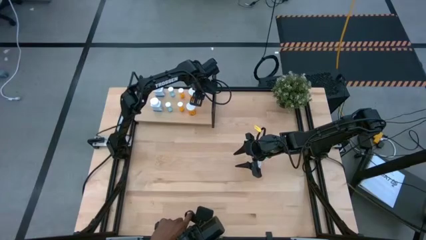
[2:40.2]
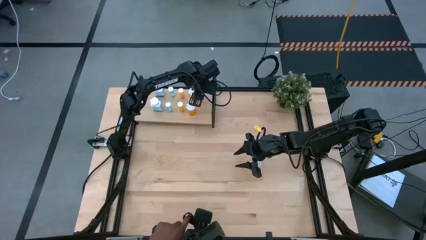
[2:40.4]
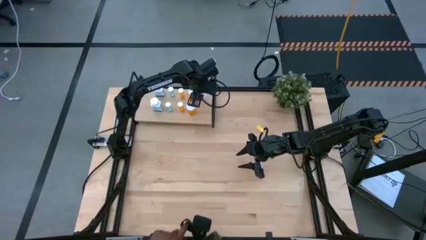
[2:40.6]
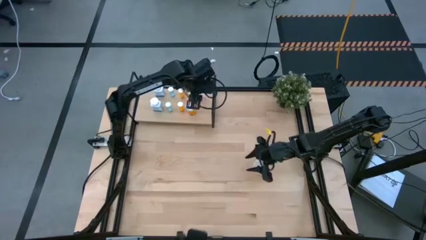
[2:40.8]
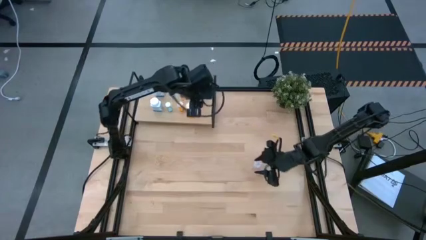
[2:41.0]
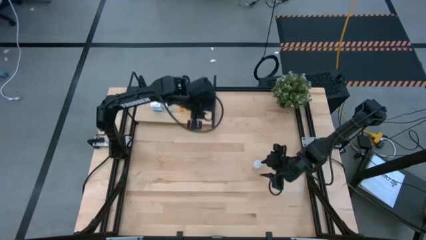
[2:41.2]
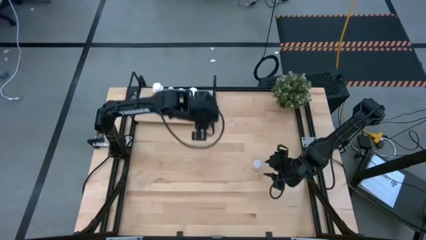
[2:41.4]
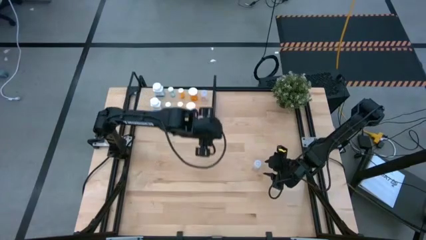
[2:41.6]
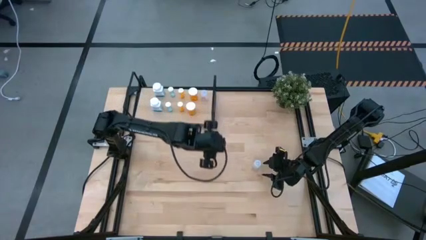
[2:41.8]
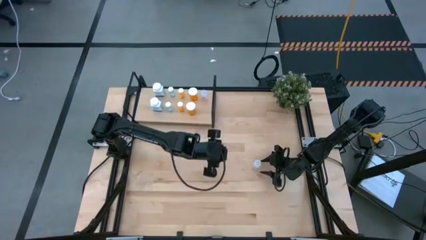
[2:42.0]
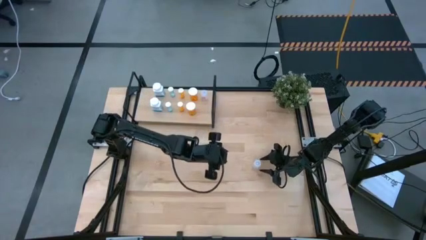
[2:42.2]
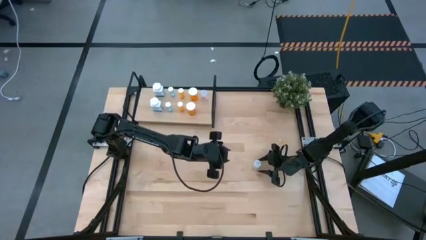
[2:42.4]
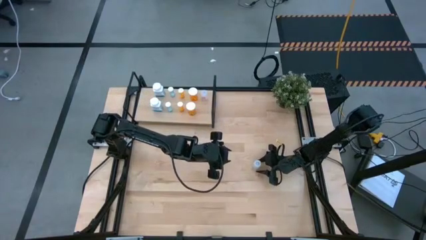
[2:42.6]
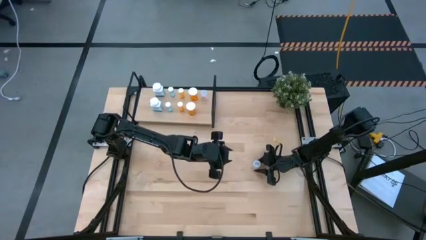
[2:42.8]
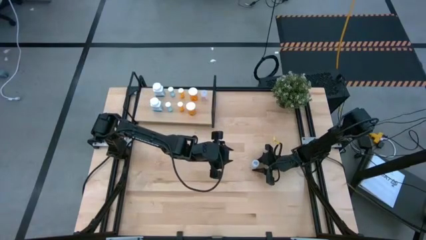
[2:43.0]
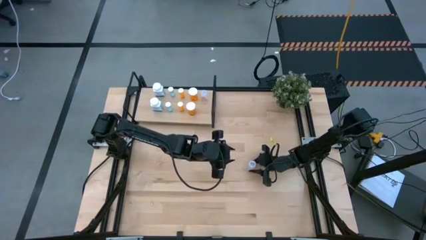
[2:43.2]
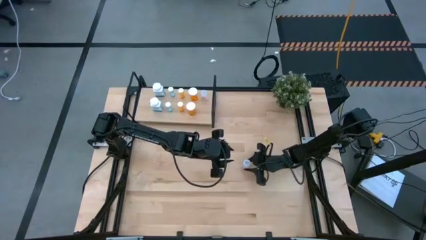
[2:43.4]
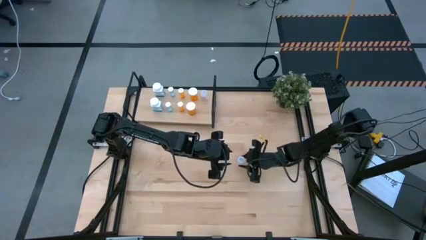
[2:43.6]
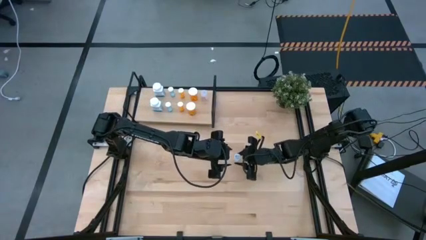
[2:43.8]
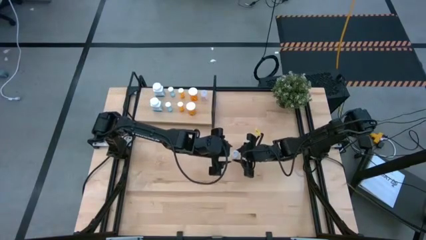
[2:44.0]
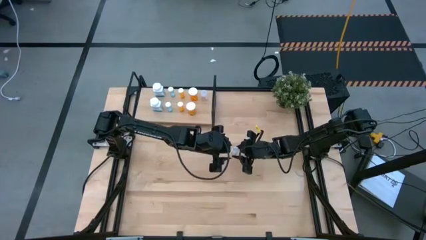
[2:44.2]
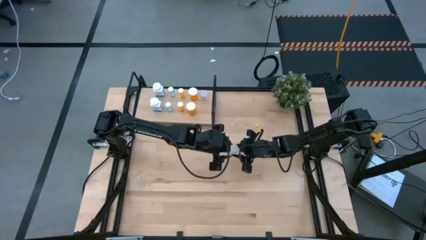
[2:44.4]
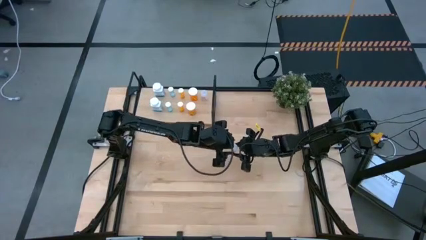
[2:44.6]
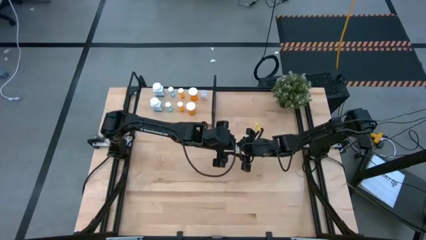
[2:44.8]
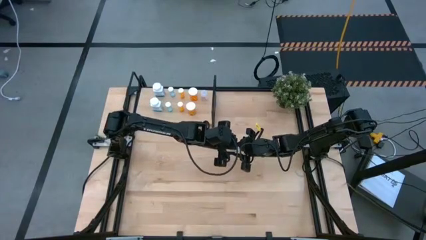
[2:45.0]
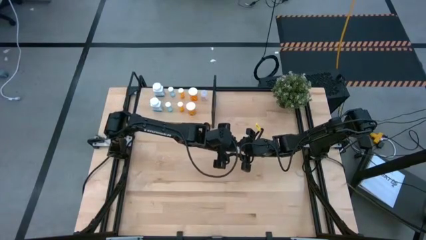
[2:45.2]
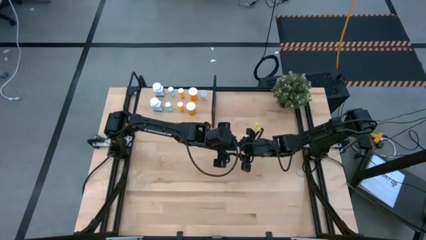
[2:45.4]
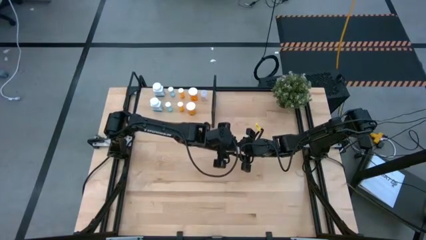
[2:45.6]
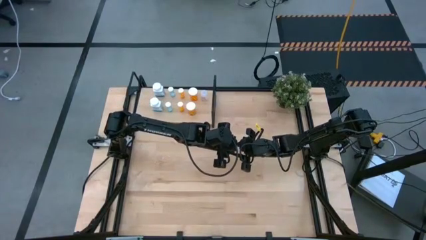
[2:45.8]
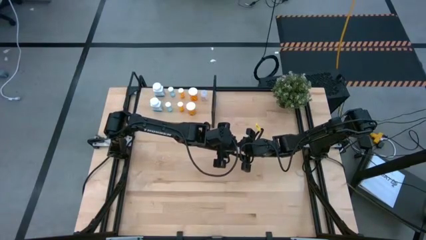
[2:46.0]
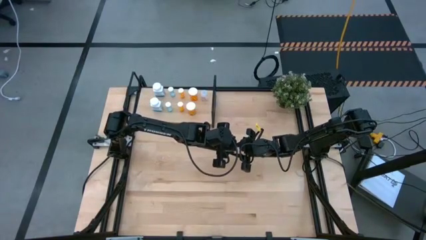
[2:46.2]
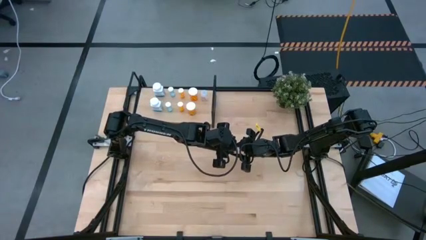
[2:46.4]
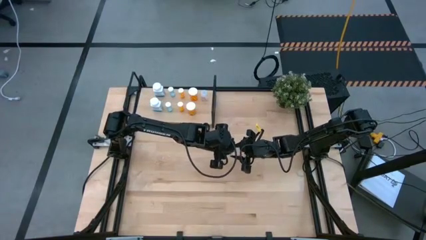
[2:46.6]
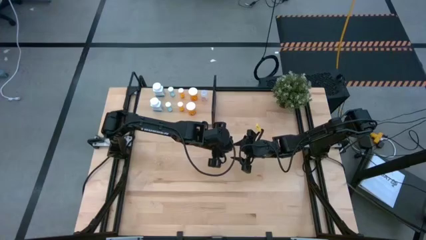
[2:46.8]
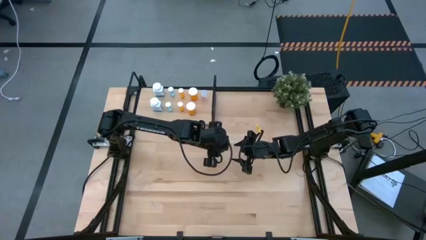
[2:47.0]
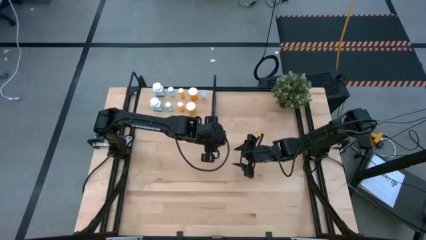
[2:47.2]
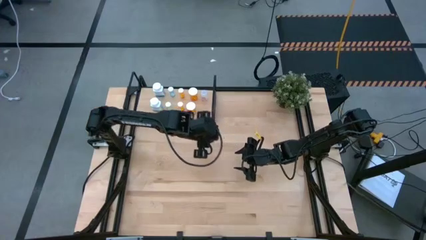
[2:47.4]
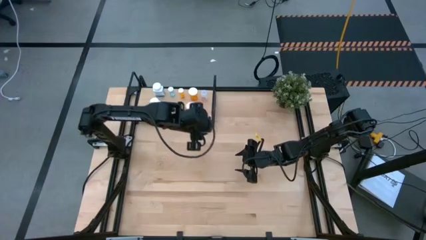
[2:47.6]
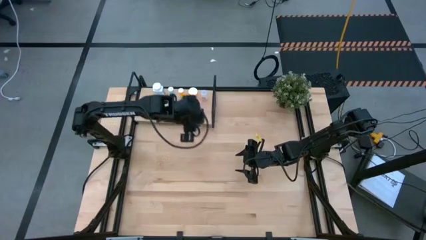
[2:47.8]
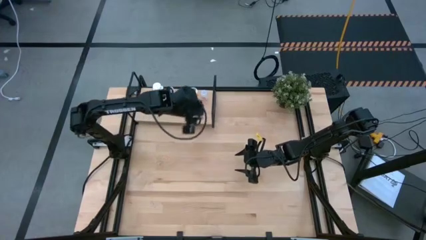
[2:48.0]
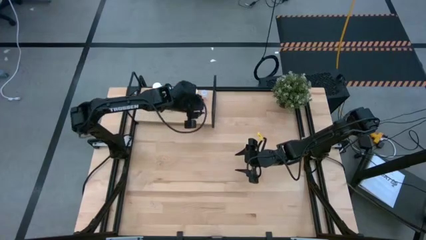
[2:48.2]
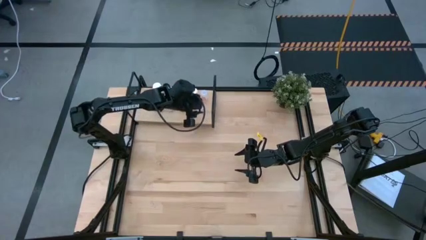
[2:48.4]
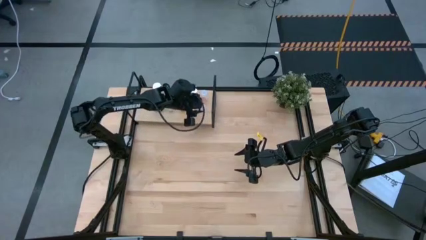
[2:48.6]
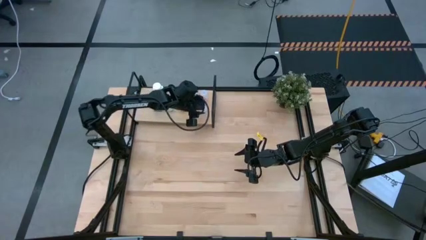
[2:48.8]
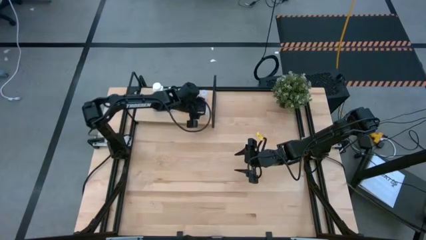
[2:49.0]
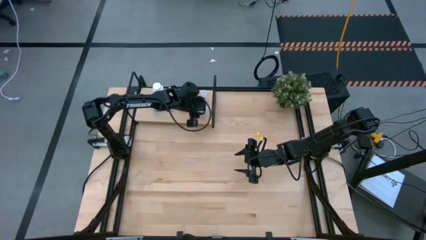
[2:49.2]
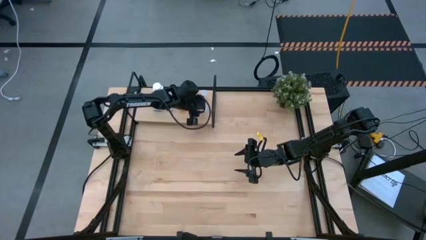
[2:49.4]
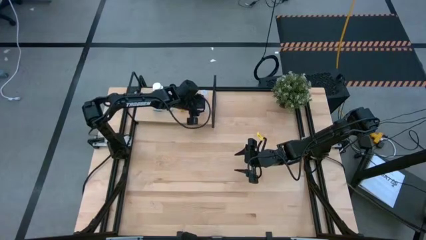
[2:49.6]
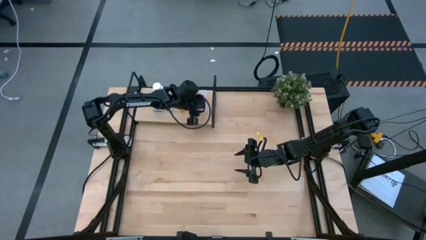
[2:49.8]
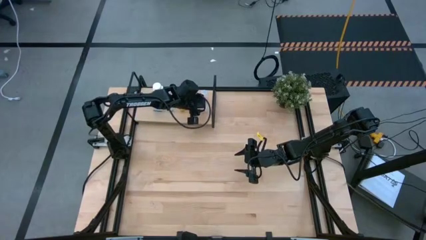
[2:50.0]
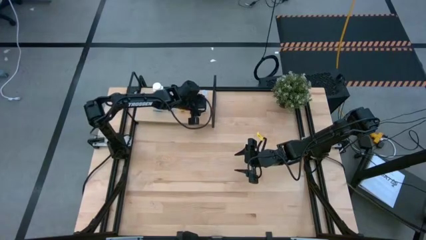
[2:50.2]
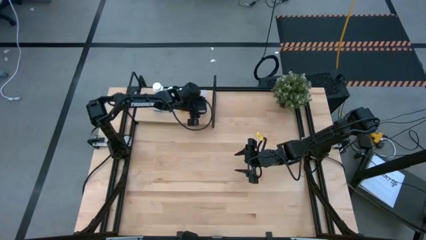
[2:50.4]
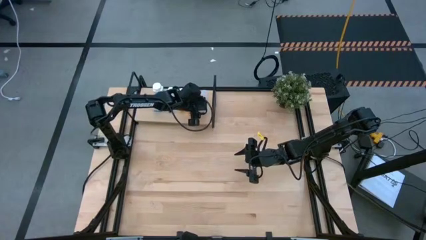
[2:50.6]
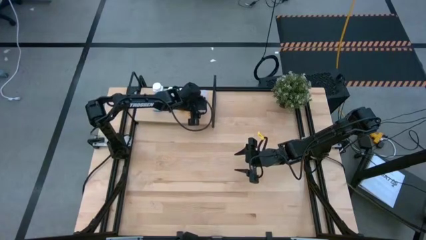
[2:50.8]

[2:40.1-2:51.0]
Task: Pick and place medicine bottles onto shelf by color
Put the transparent pill bottle aligned with the other transparent pill bottle on the shelf

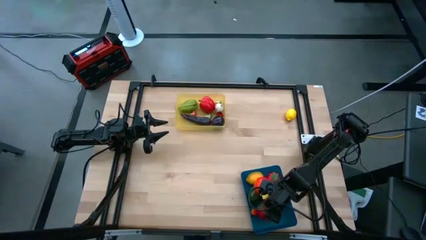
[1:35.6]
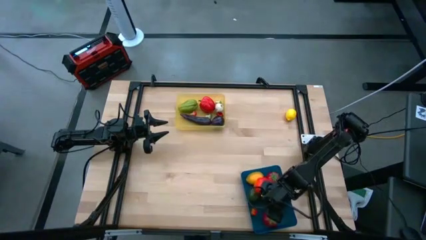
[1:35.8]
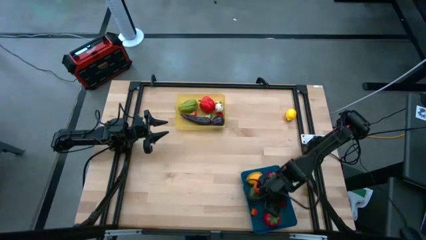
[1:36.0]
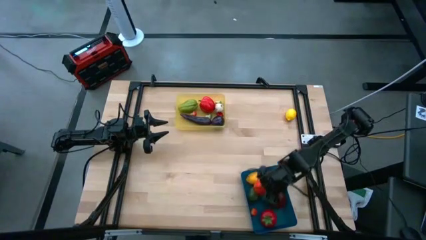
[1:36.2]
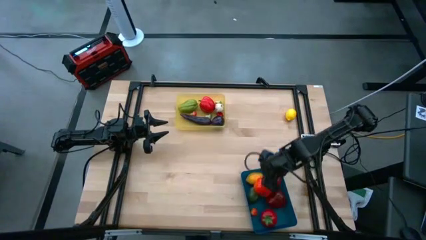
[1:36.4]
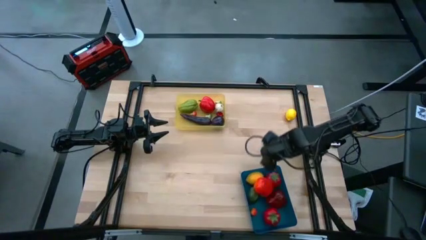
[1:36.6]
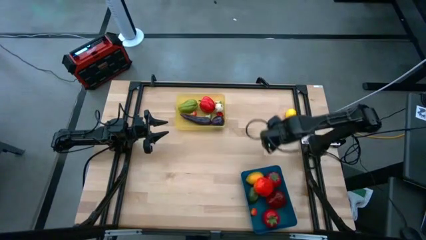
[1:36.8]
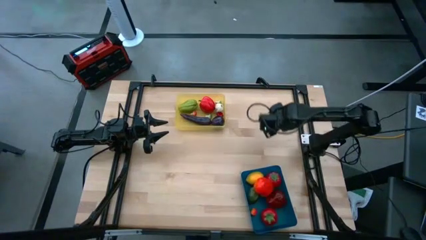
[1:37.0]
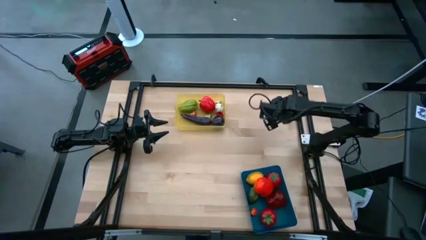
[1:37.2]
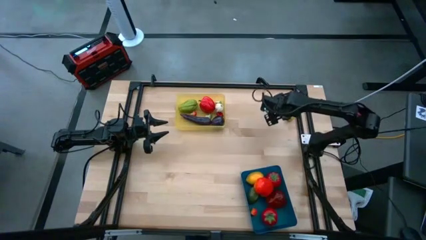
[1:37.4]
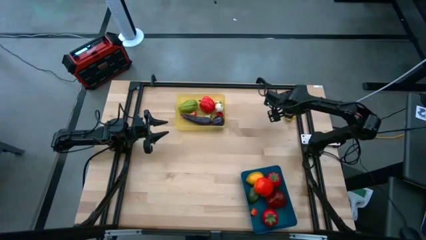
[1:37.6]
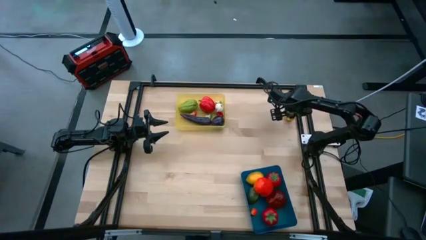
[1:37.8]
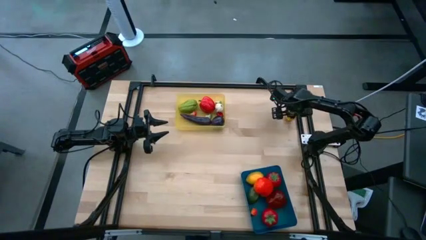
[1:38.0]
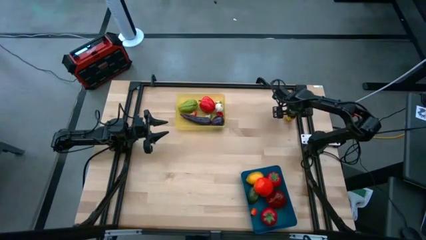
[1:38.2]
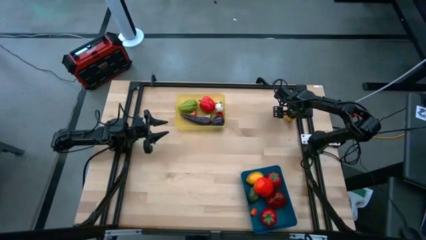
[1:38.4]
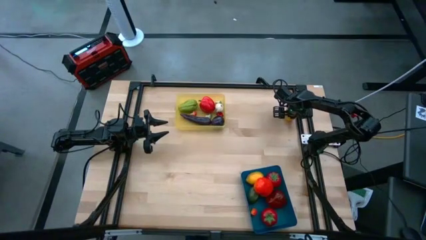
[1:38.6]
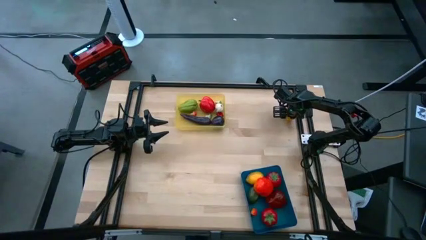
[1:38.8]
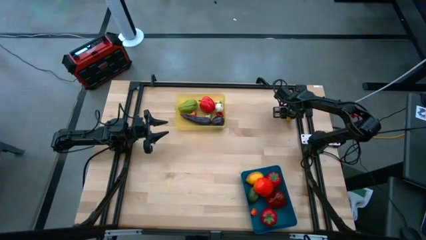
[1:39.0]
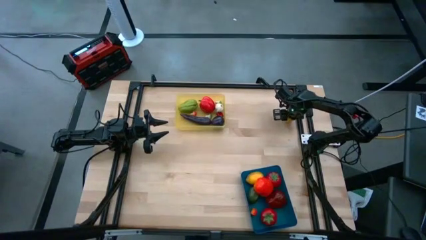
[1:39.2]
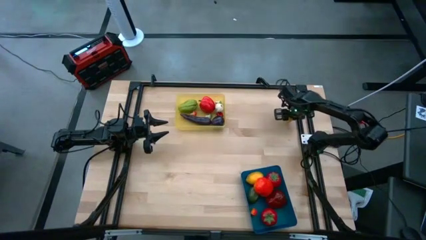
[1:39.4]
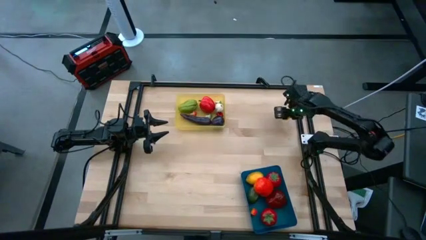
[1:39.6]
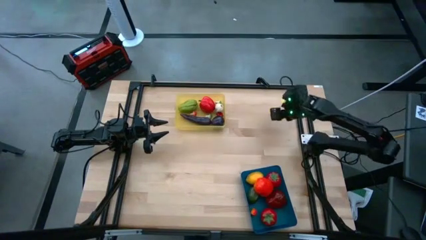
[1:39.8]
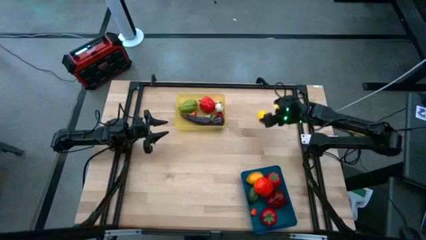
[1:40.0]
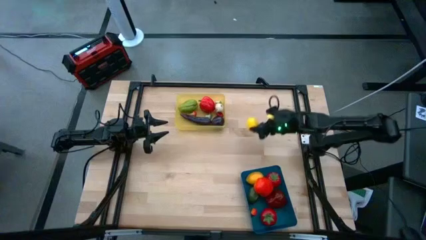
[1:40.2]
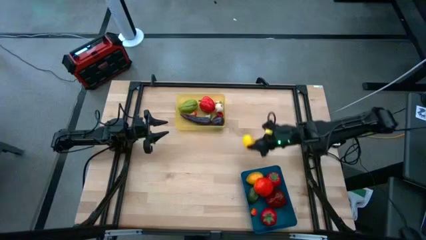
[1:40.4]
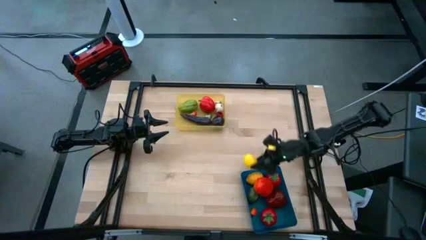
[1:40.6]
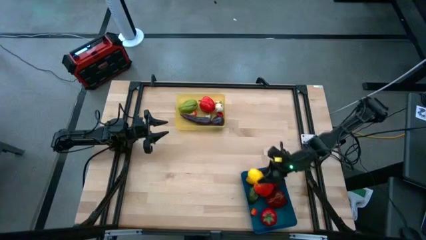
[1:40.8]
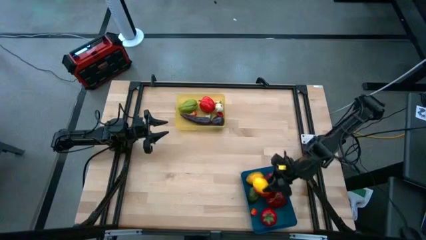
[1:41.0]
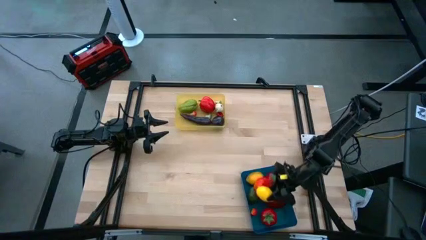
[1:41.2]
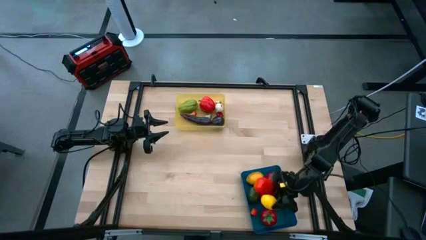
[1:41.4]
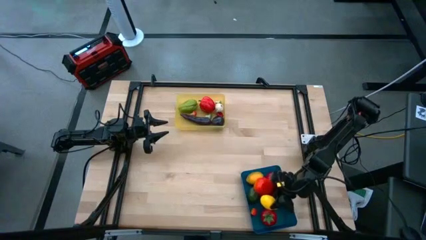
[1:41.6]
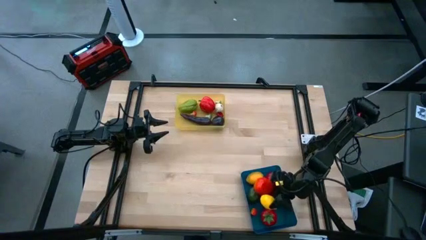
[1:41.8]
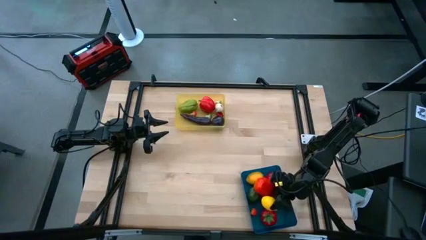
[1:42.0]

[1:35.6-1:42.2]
Task: Sort produce into baskets
Put the yellow lemon into the blue bin
